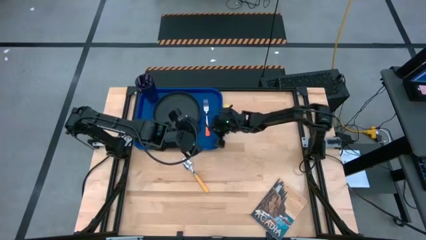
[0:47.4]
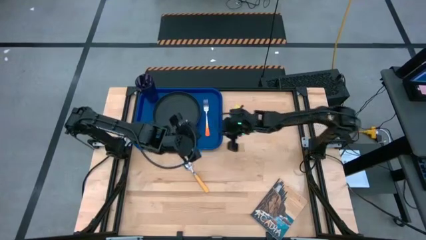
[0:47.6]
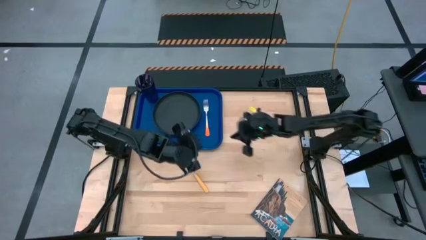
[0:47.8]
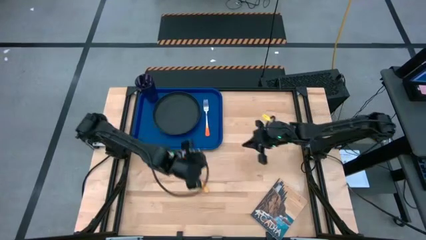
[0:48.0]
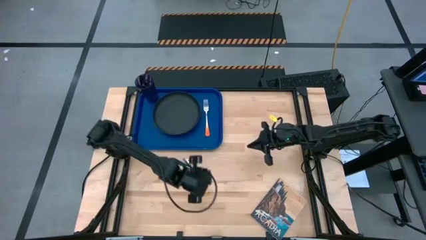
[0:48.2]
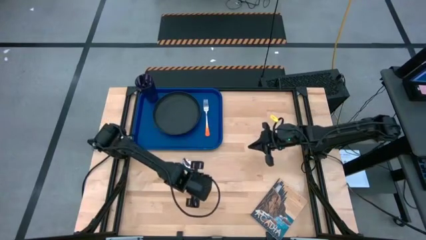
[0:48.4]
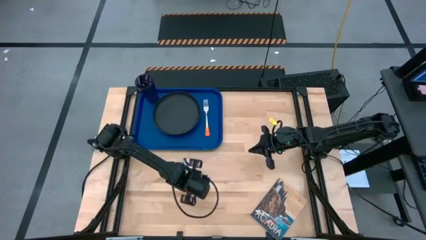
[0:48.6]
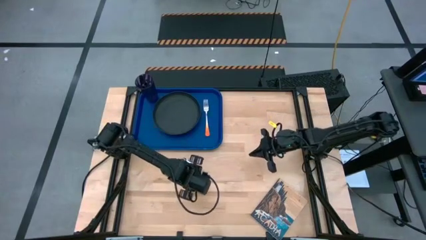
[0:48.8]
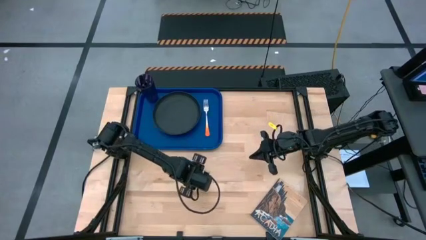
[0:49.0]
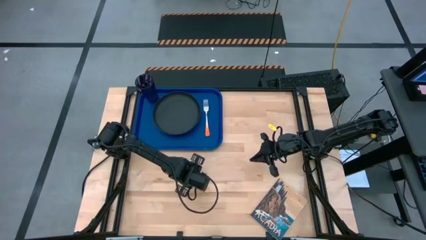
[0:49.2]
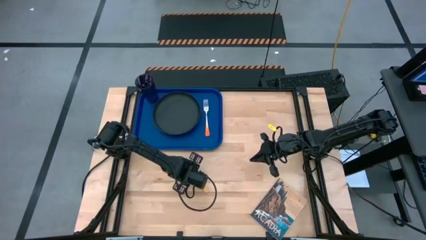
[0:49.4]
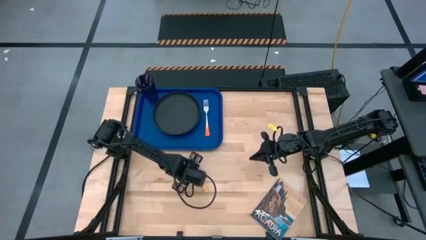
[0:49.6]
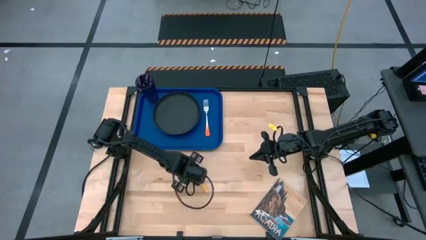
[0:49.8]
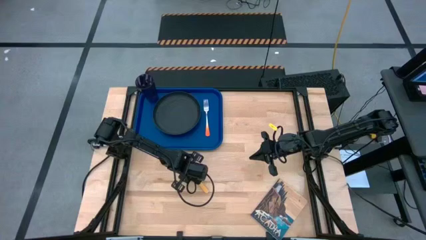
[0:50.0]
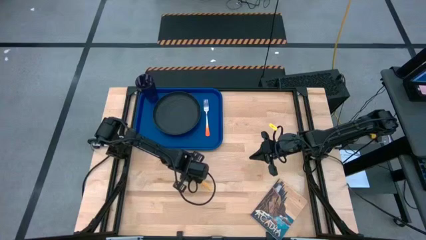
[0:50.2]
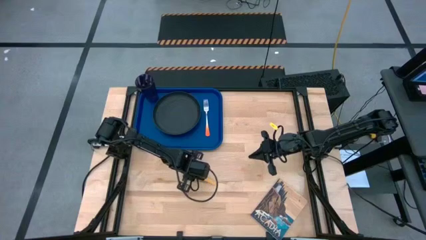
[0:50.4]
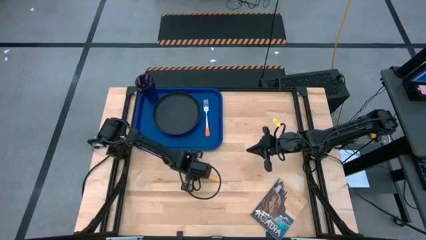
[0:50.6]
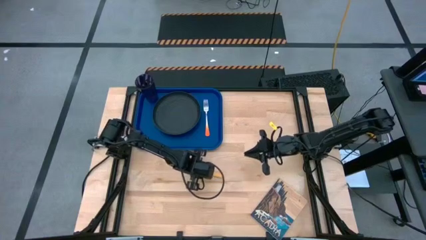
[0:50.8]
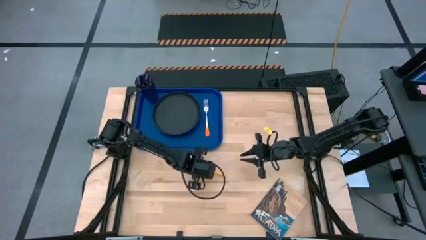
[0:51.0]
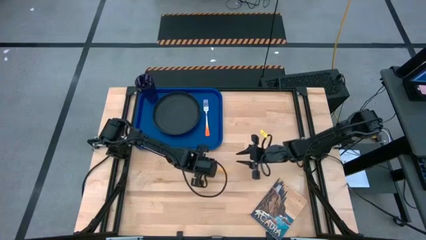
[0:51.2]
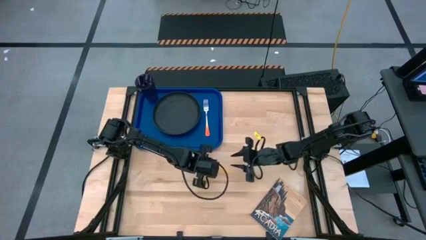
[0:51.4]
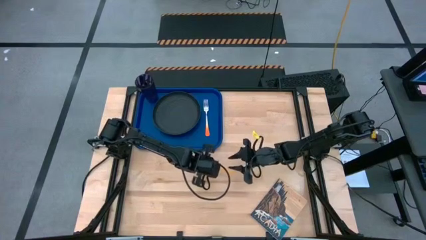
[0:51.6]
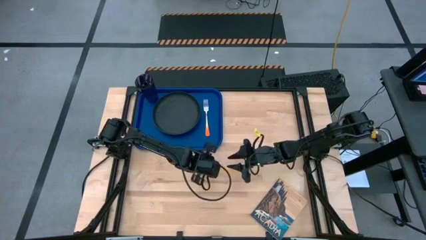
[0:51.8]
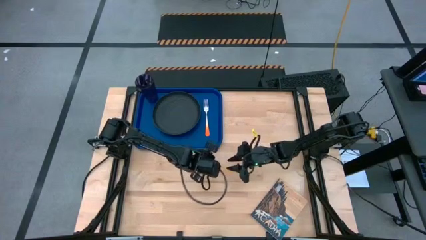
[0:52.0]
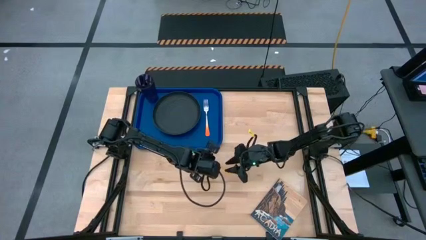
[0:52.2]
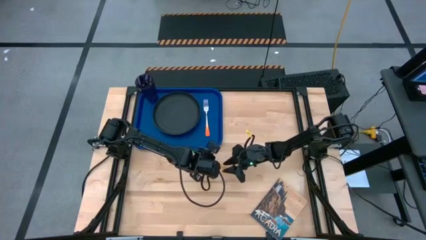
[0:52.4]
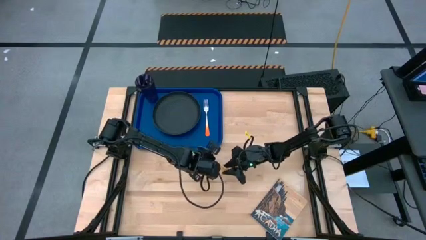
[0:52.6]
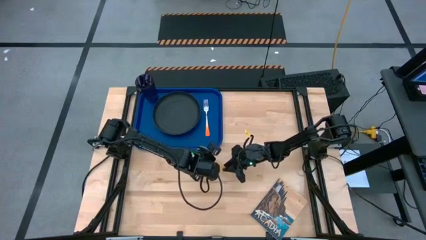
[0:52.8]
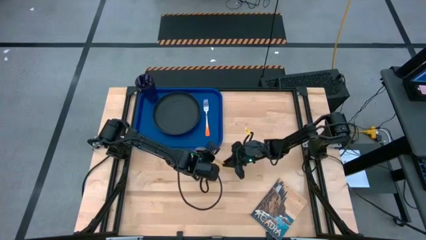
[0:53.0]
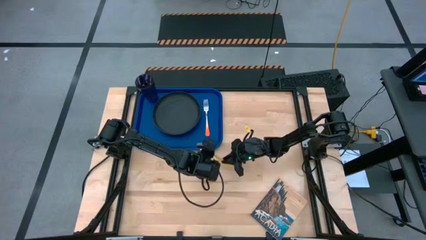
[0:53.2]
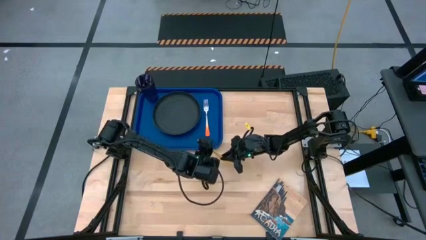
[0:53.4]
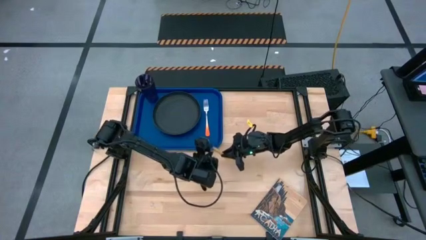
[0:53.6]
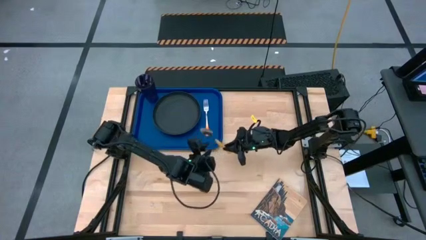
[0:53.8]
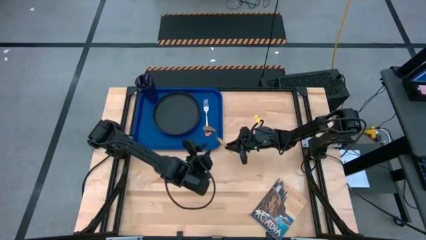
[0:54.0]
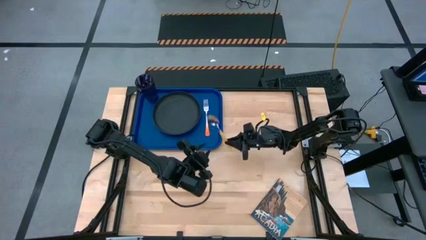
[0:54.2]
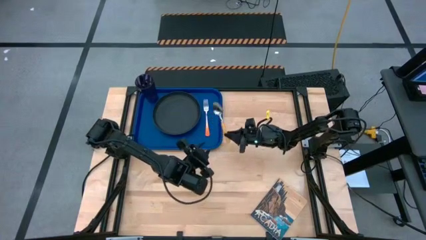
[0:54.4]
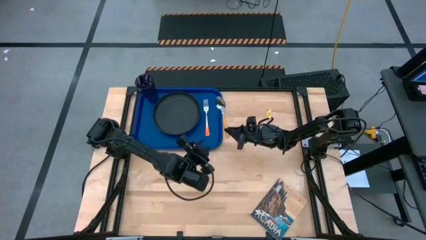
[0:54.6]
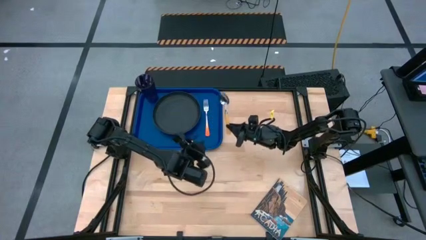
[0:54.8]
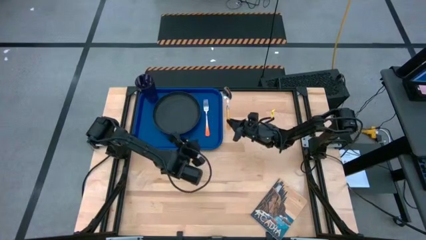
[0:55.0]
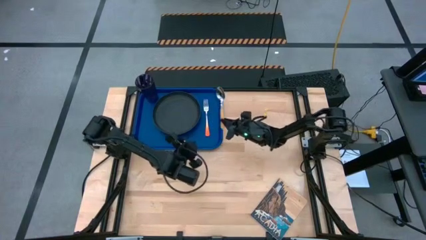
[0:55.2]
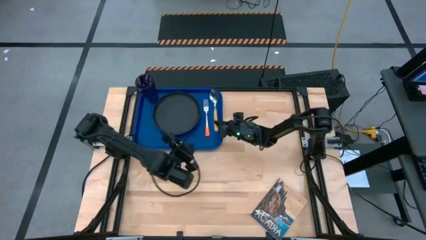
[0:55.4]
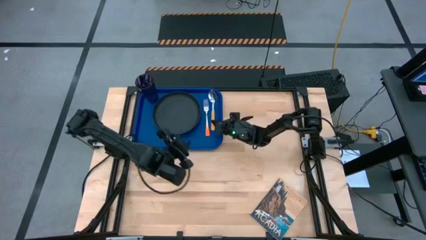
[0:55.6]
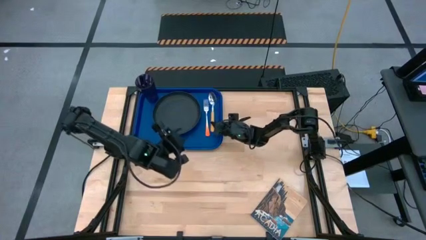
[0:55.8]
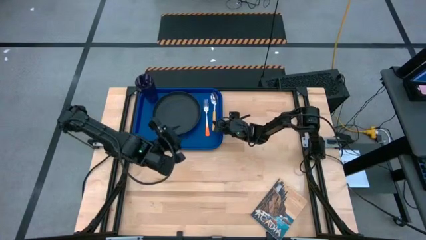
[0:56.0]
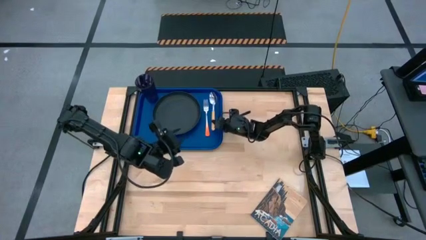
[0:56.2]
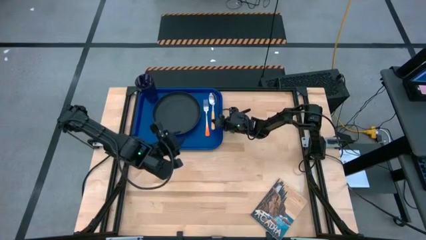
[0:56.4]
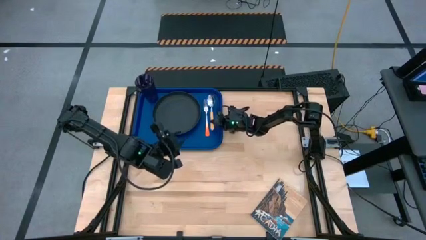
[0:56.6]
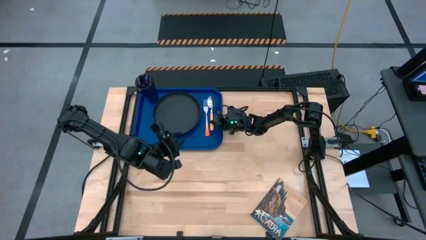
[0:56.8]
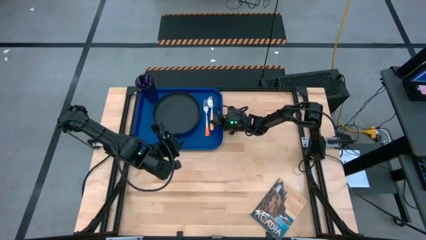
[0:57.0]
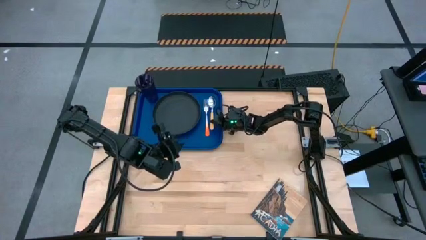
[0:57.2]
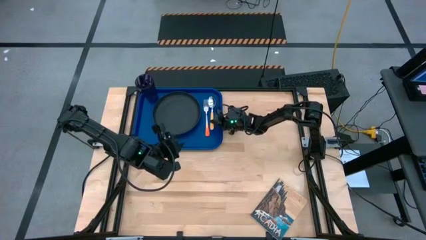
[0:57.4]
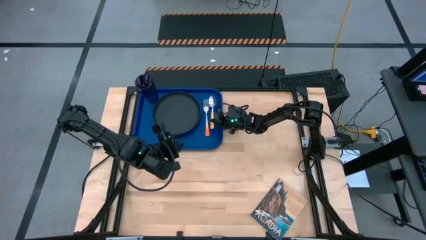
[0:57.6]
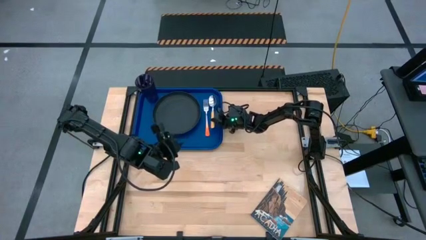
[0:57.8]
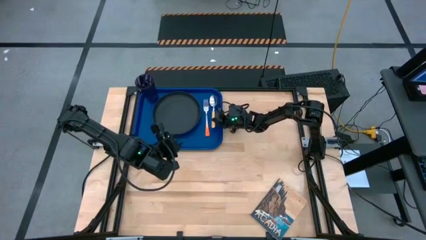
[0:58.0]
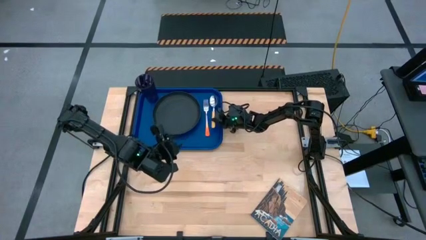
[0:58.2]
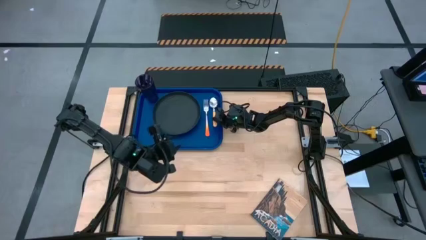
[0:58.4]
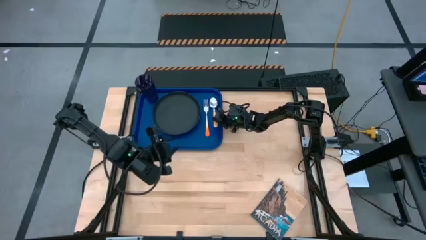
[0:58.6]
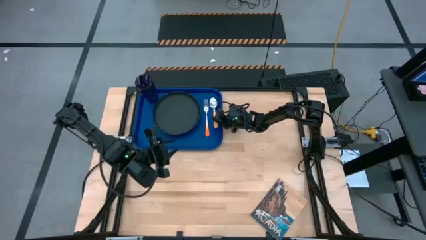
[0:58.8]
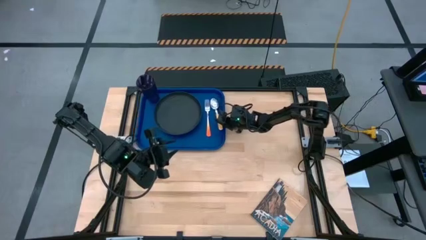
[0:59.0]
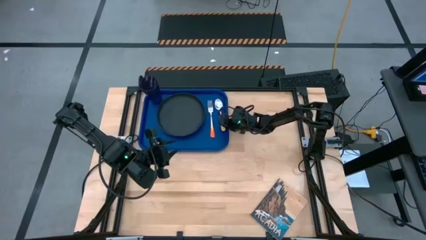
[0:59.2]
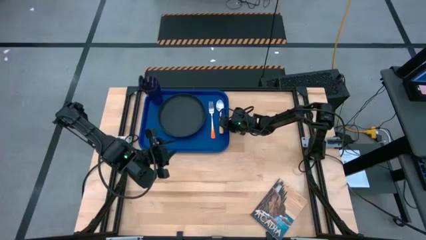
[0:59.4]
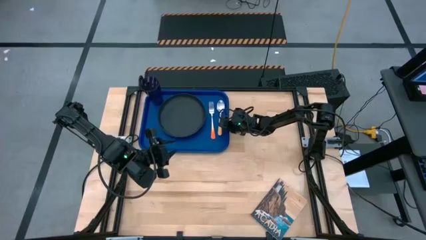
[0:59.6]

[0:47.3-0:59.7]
Task: Pick and place plate/cup/fork/spoon on tray
Put the yellow spoon on the blue tray beside the orange fork

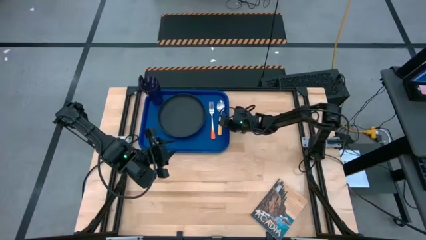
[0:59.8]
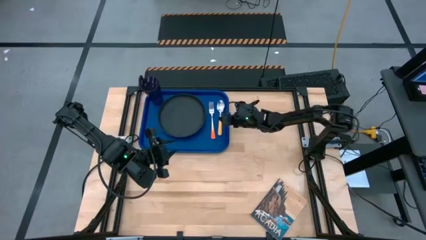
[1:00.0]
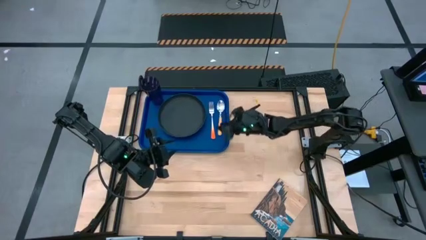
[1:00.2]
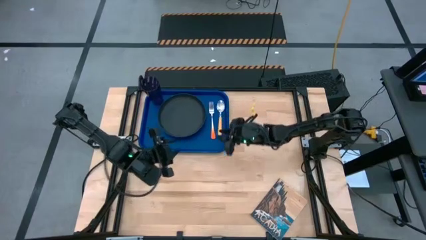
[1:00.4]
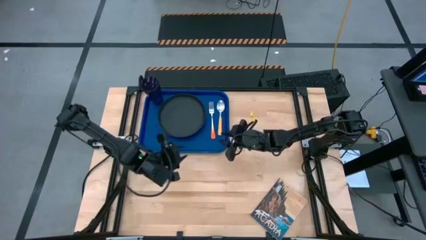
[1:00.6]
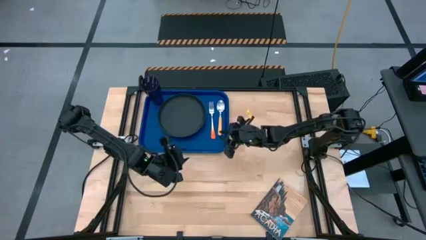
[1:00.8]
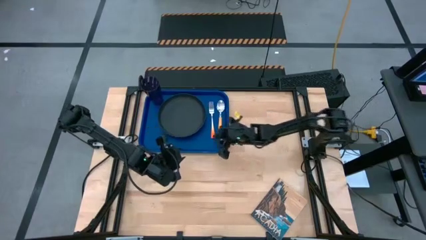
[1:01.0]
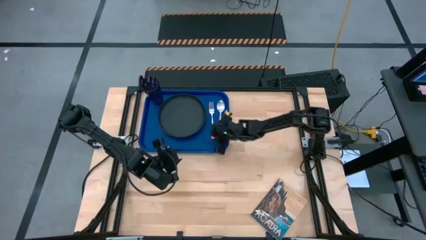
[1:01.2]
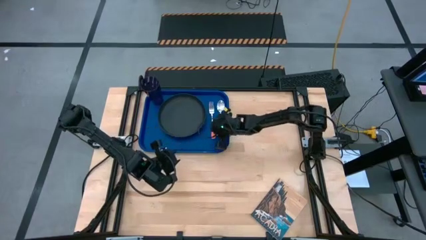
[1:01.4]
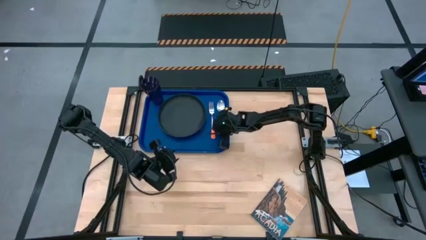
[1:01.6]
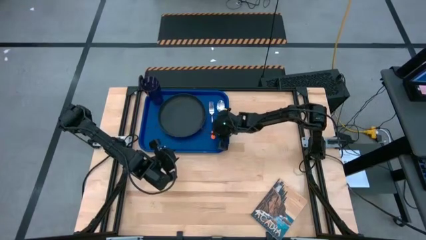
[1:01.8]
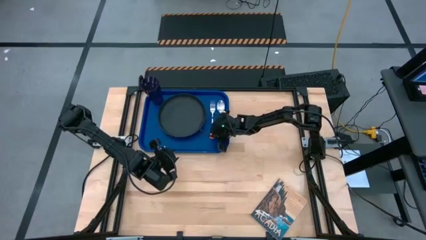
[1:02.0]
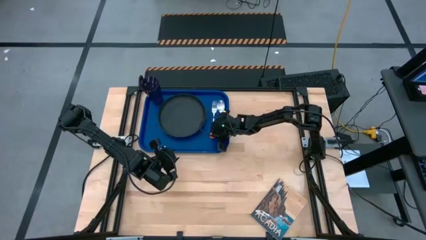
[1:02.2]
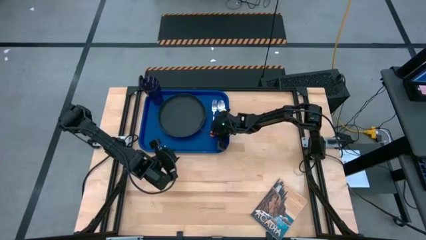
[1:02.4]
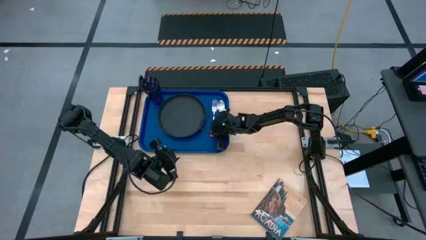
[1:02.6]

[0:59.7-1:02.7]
Adjust the orange fork on the blue tray
